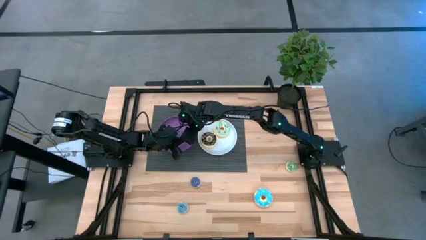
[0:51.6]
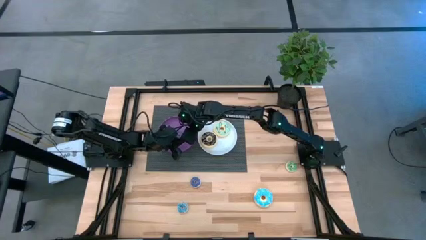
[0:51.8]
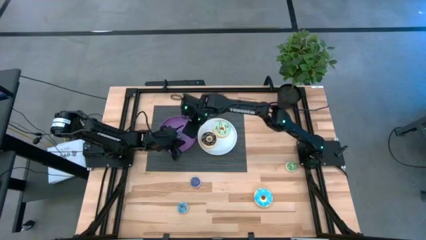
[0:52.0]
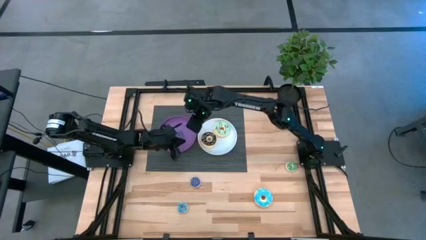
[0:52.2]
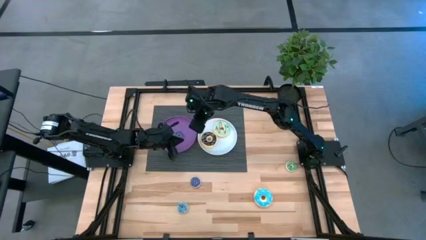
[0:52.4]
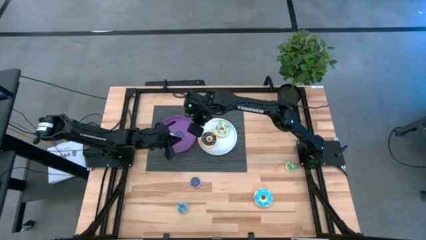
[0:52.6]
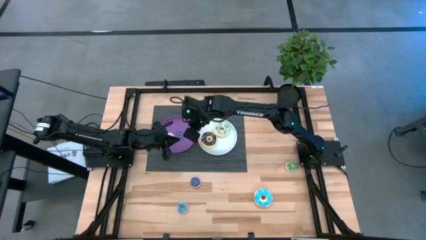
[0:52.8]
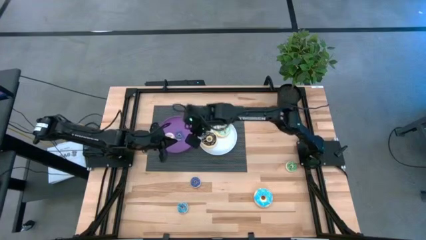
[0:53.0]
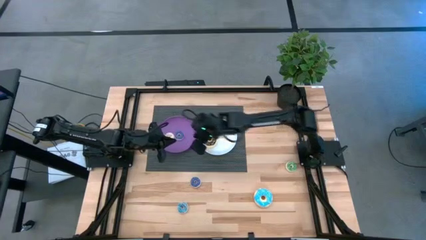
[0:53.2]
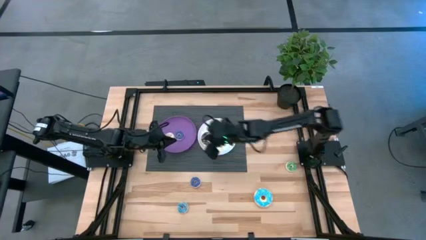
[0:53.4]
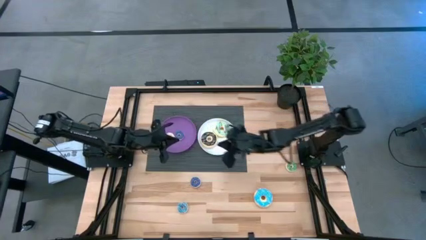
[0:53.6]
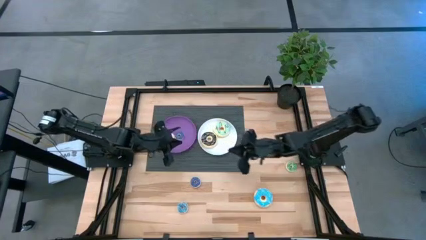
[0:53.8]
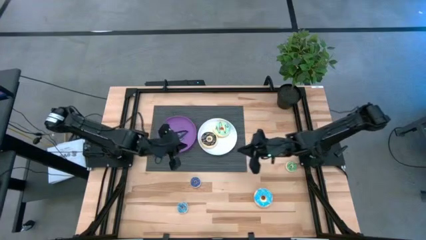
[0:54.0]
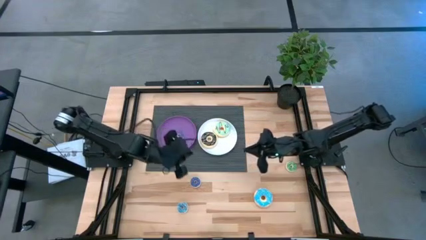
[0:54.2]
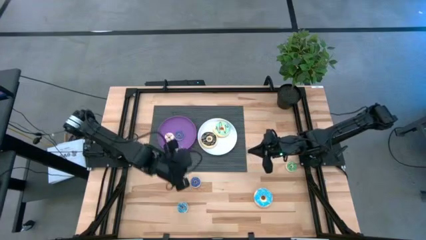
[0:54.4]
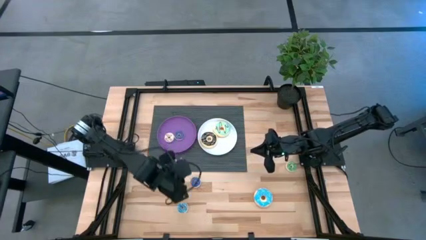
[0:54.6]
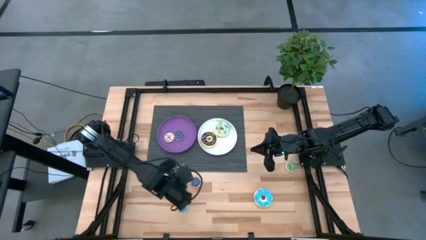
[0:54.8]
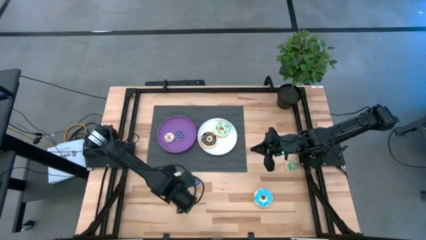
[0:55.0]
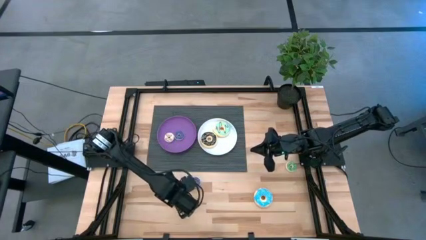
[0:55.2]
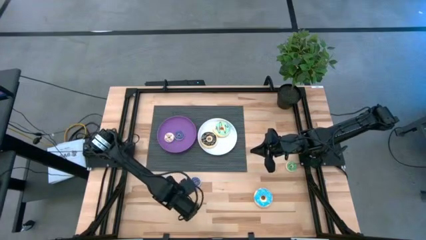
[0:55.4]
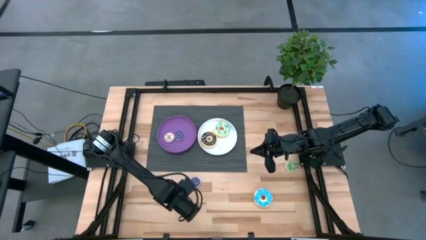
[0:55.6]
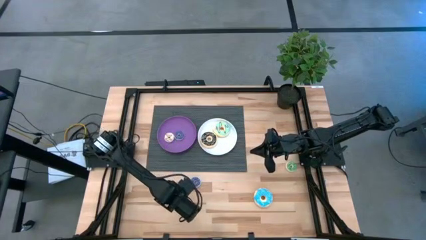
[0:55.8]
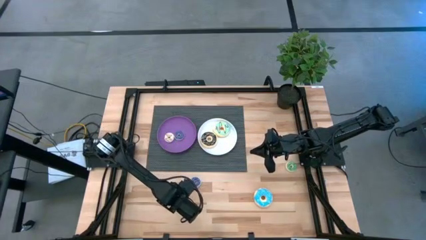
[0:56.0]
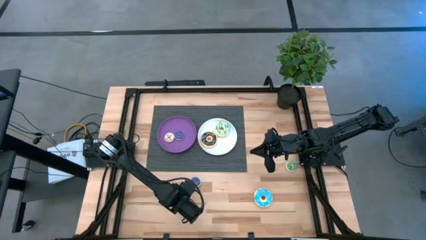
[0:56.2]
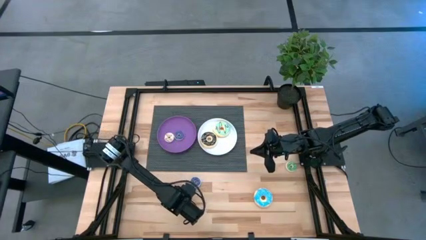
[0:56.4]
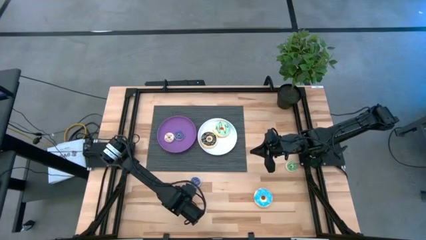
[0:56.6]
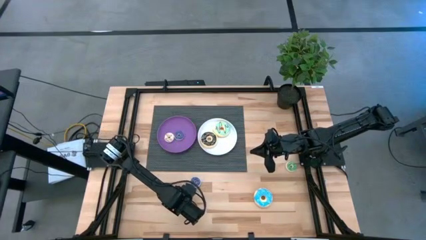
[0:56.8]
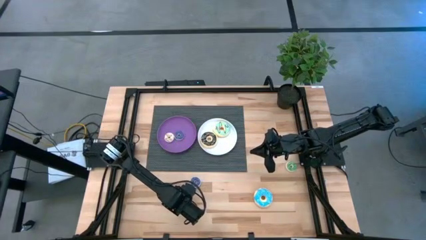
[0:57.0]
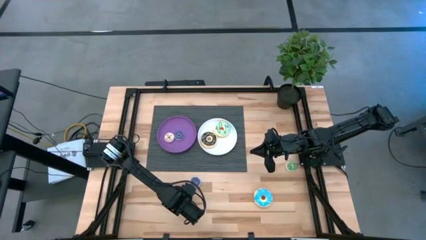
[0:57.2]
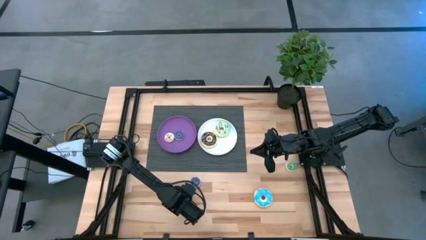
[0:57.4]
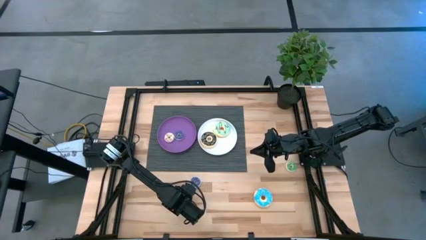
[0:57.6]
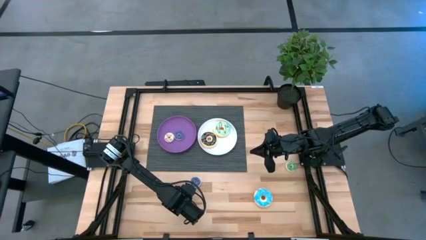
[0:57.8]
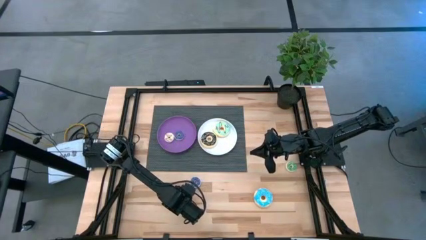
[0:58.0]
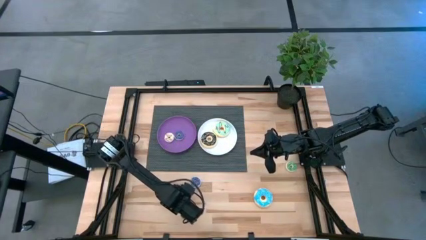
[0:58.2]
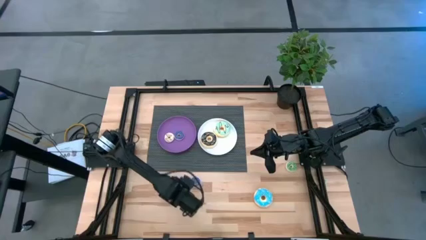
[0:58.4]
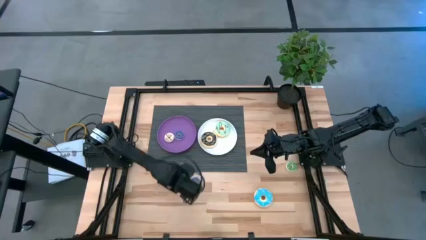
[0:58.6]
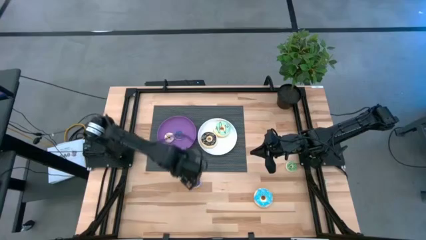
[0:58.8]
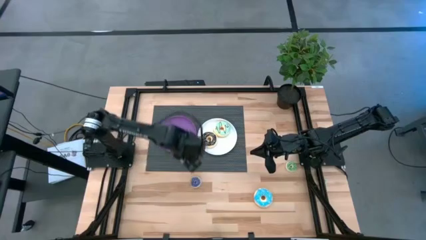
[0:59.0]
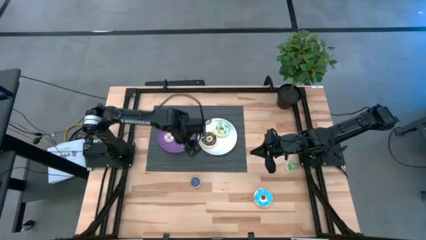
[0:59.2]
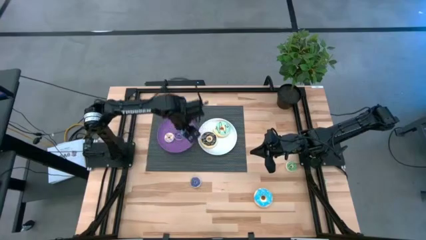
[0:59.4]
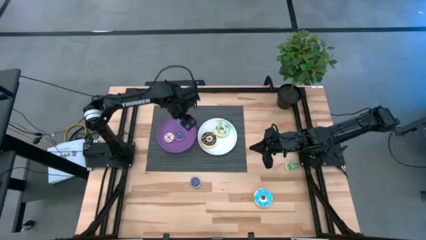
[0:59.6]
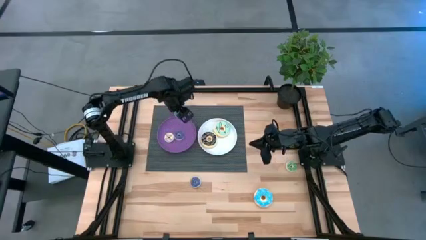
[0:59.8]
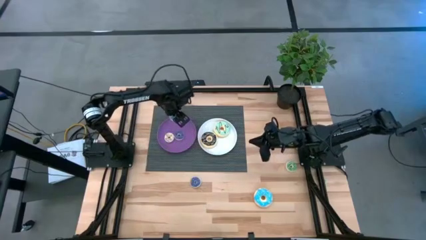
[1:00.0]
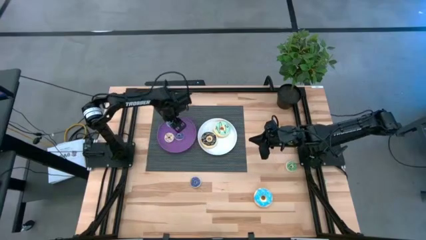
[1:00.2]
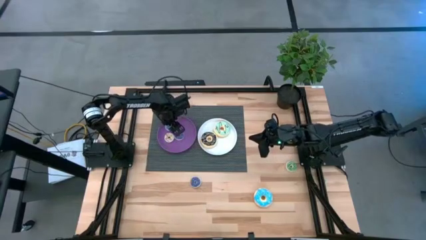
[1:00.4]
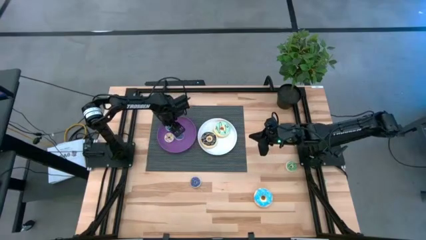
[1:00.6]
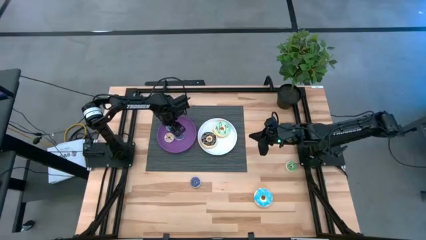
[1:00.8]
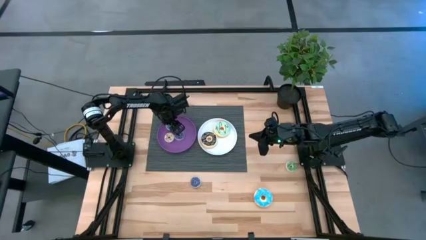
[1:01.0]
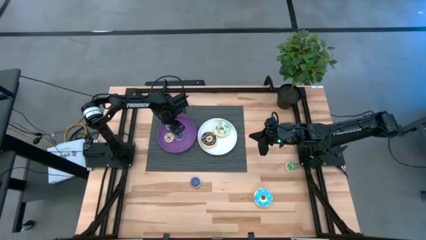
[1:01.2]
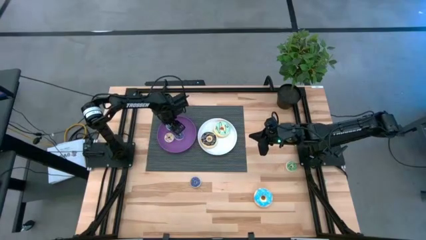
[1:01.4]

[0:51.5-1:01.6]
Task: Pick & Place donuts
Put the small blue donut on the purple plate

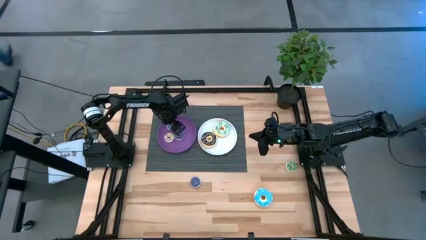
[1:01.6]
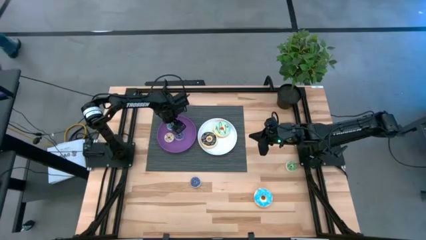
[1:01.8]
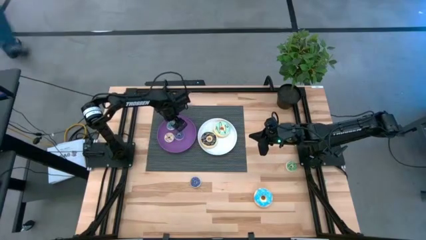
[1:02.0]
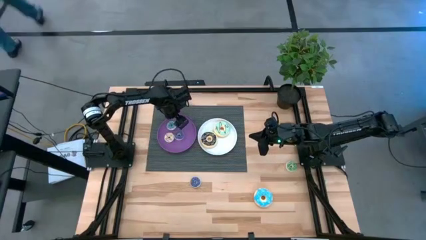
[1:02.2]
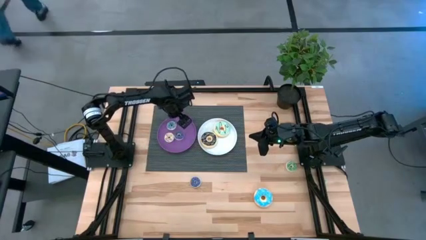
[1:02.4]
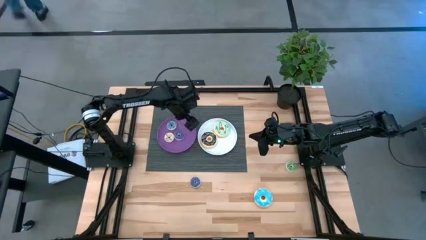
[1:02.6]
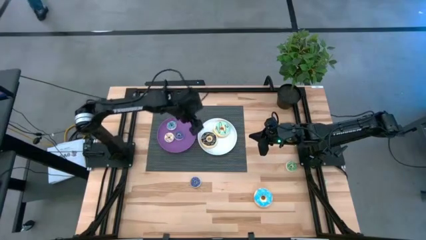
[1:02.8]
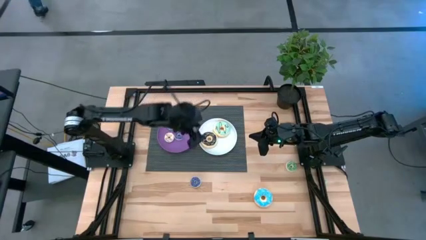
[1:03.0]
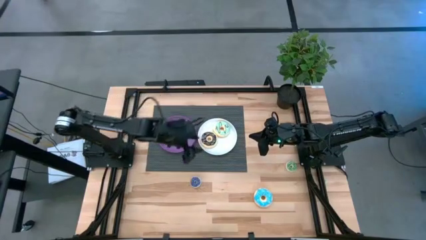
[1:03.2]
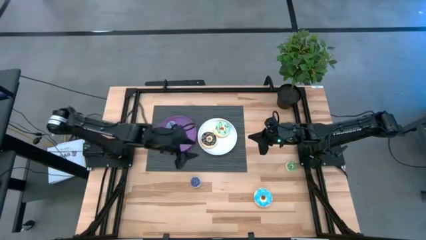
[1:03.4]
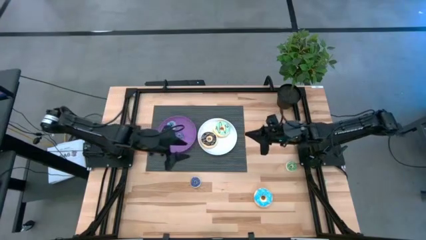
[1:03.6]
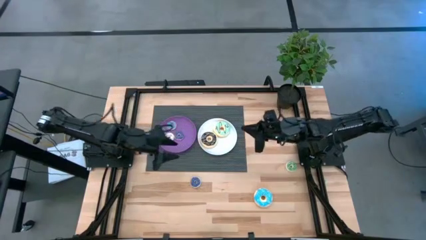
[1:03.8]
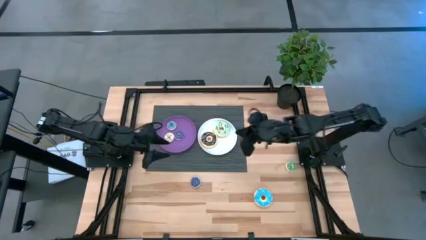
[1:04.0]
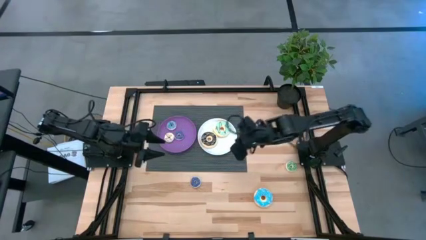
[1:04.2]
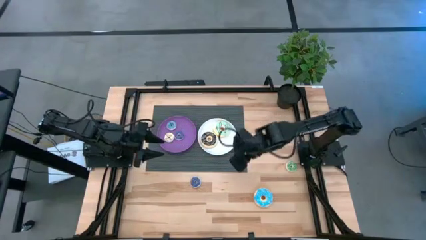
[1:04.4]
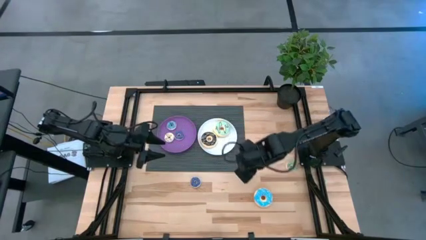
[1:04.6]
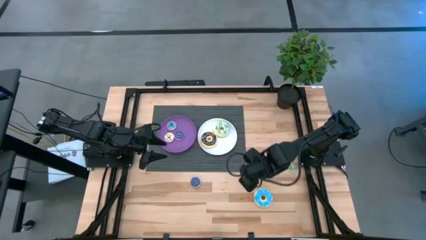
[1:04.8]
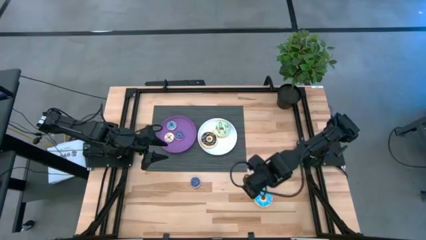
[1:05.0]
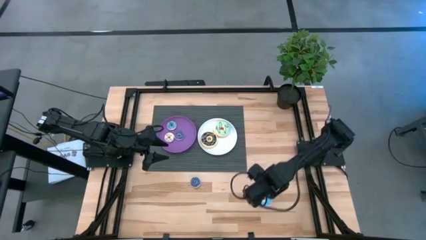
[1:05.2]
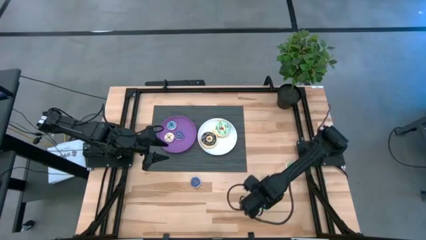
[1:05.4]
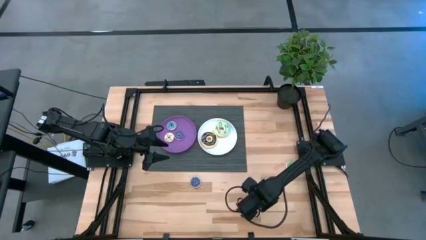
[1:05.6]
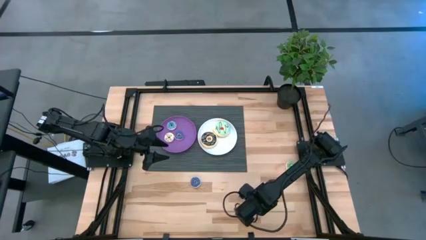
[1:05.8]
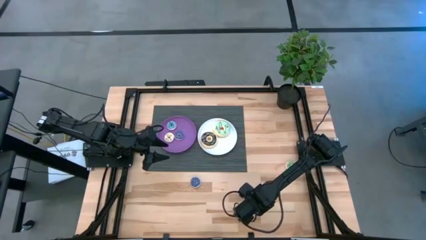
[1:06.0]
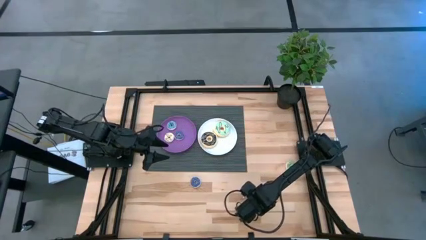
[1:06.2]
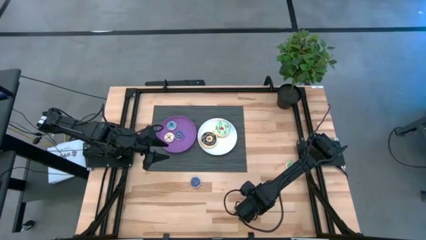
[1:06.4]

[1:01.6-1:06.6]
Put the large blue donut on the white plate
